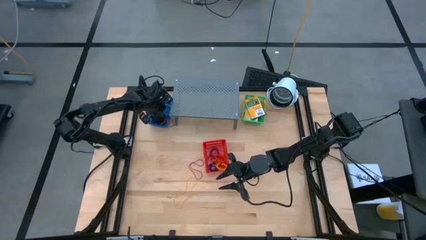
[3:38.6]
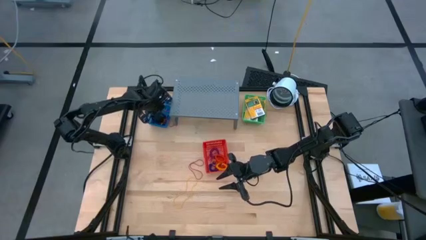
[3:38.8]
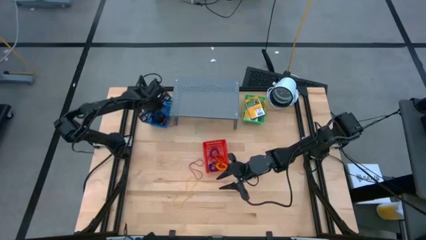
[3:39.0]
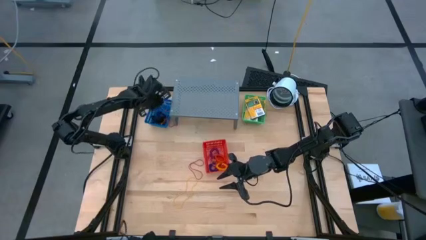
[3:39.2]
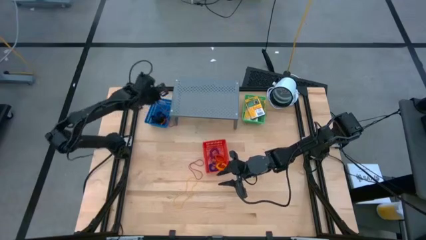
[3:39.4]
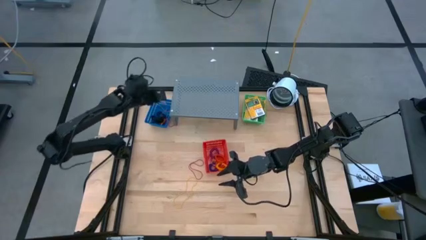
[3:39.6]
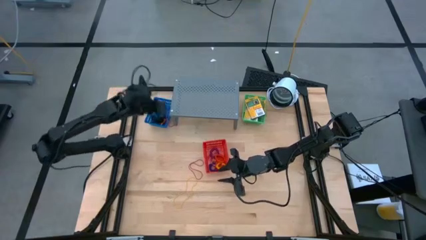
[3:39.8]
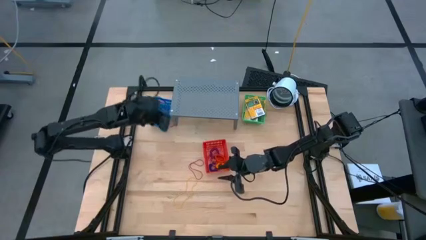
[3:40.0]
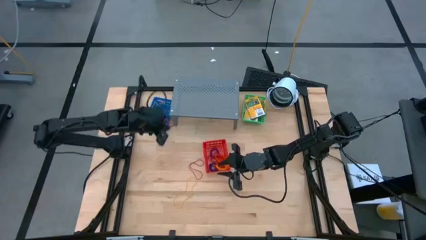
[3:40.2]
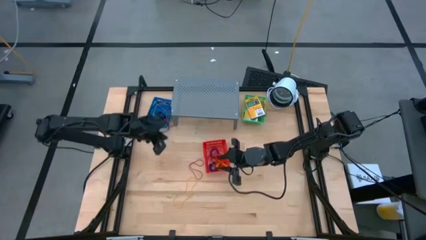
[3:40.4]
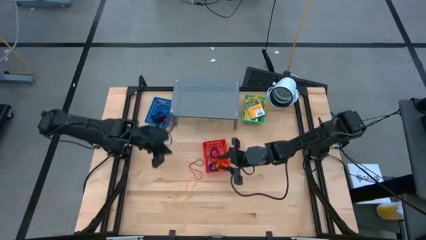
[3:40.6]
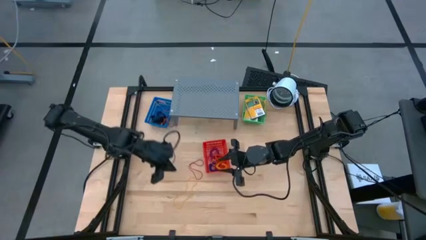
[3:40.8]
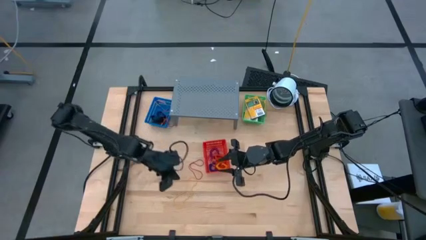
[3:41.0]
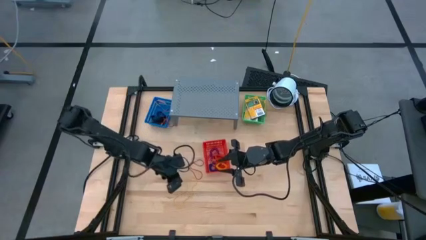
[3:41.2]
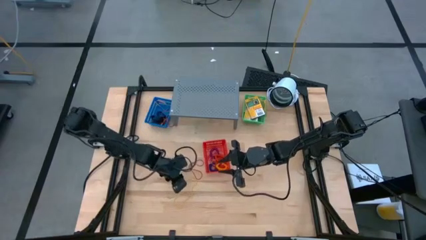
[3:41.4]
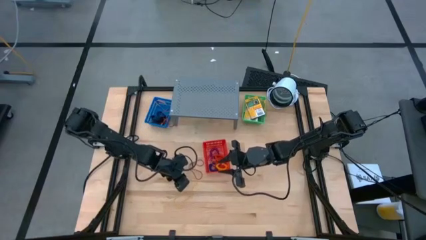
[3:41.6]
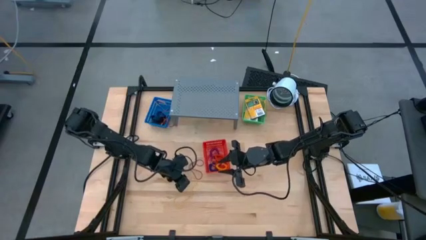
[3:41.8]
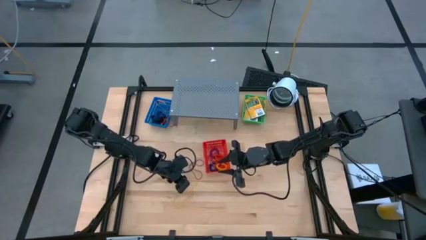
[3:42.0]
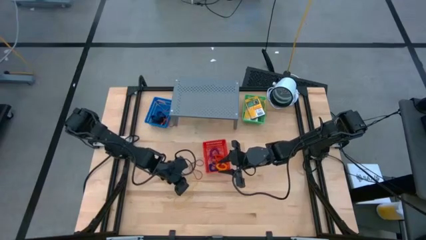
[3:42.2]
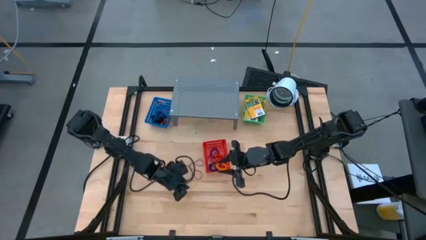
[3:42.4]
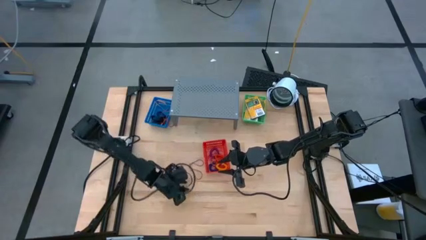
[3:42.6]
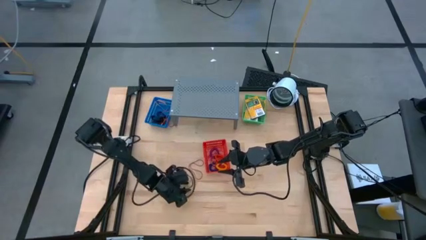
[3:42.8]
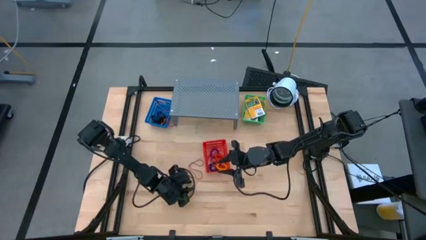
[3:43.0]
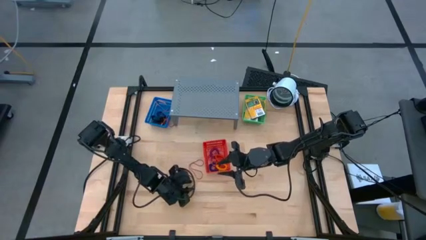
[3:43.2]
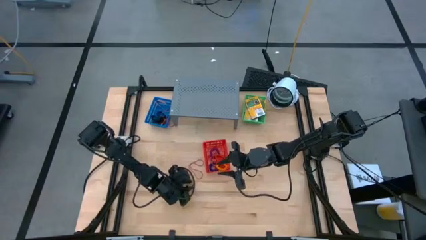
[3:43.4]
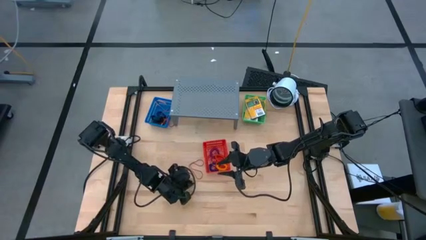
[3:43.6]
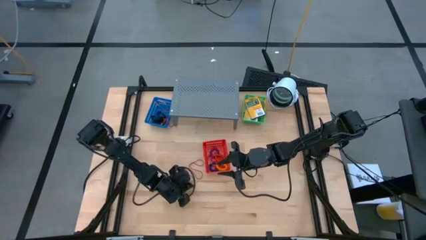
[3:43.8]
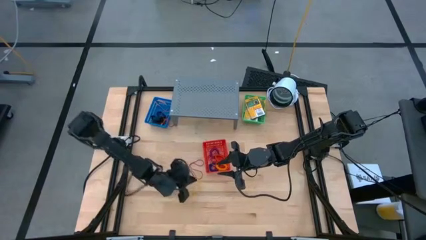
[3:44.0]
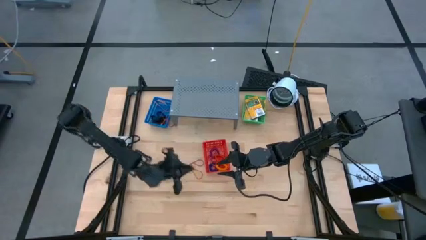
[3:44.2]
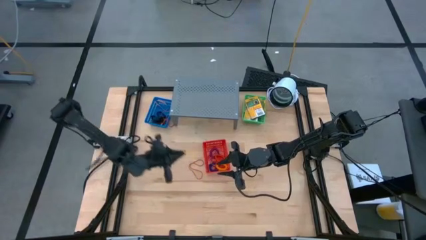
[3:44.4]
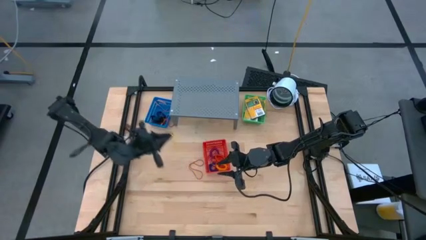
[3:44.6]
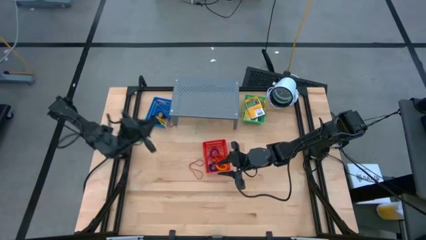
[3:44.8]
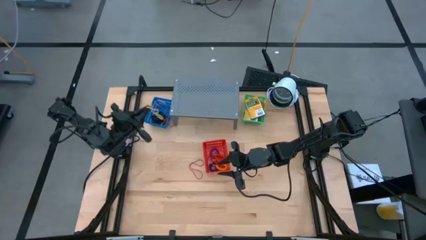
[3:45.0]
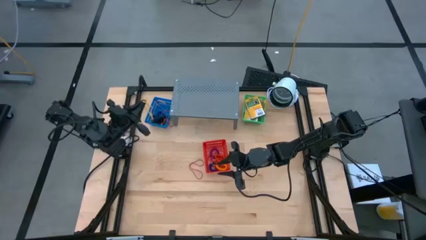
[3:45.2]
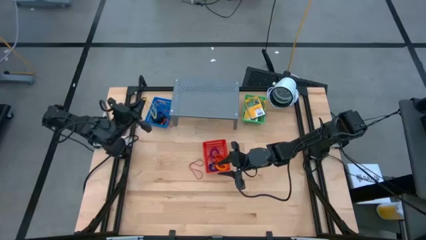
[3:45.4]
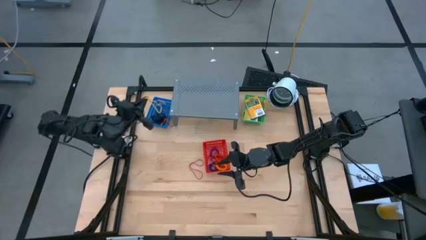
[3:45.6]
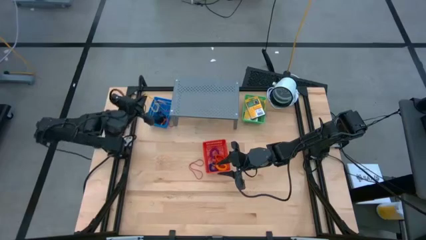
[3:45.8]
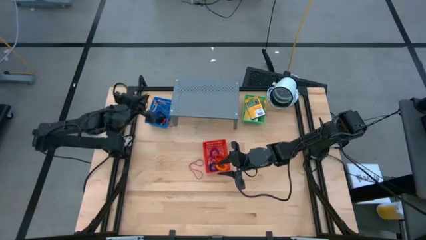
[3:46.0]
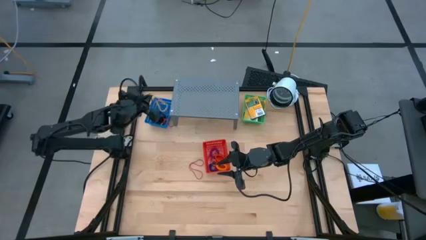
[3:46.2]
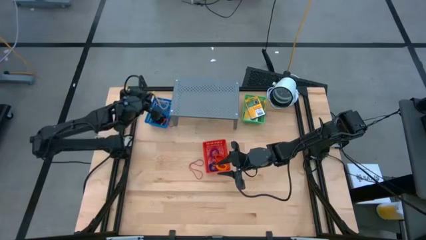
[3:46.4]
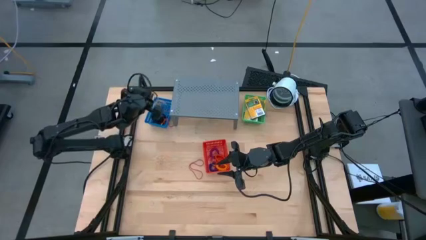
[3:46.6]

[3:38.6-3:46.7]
Task: Pick & Place Office Desk Supplies
Put the yellow rubber band into the blue basket

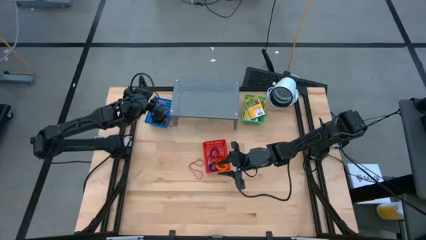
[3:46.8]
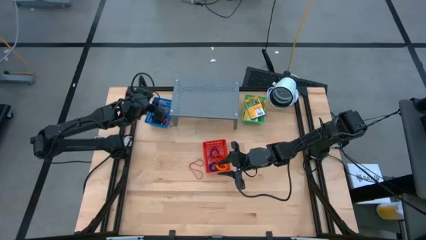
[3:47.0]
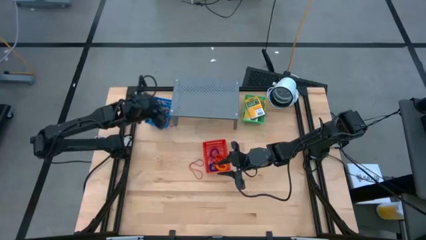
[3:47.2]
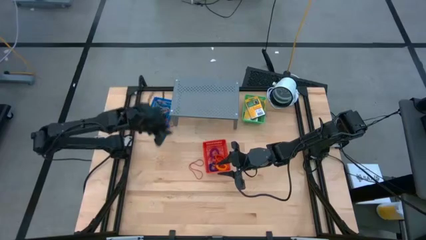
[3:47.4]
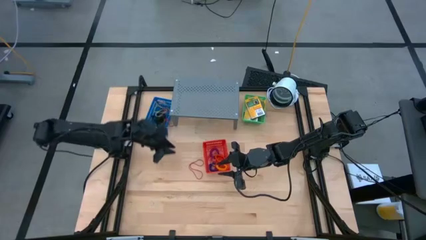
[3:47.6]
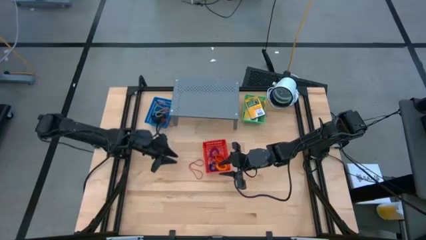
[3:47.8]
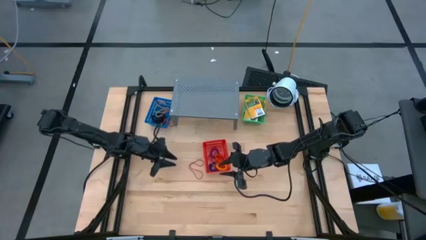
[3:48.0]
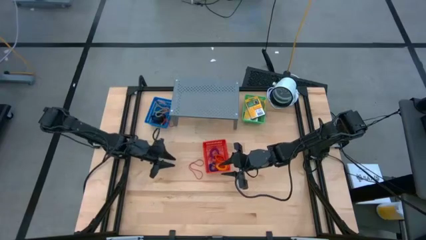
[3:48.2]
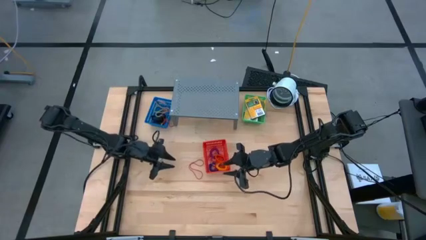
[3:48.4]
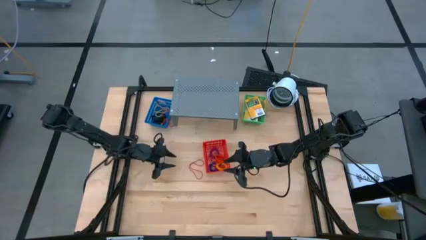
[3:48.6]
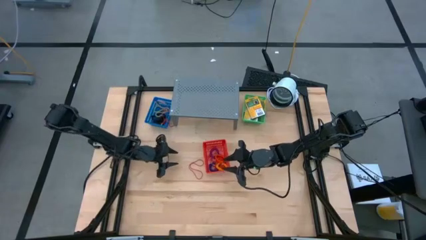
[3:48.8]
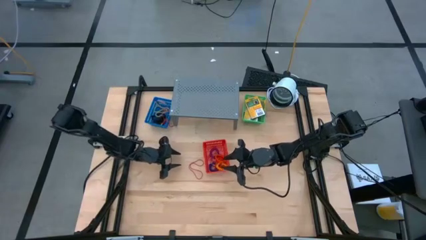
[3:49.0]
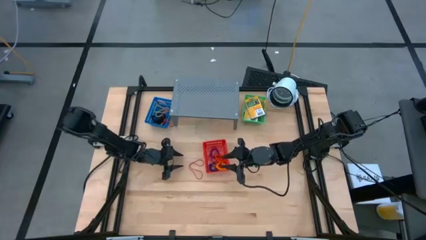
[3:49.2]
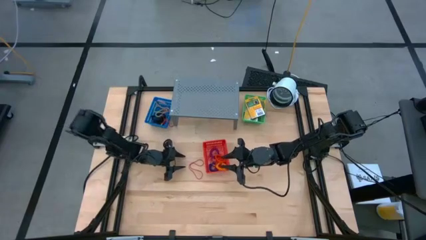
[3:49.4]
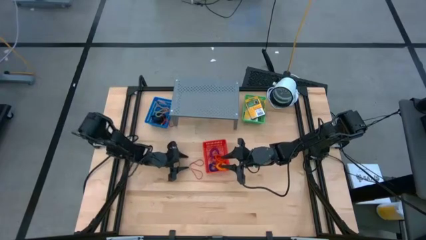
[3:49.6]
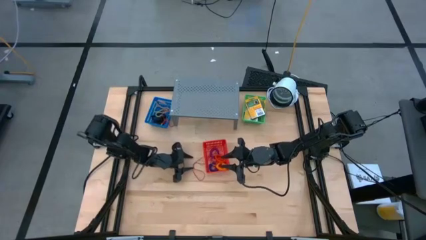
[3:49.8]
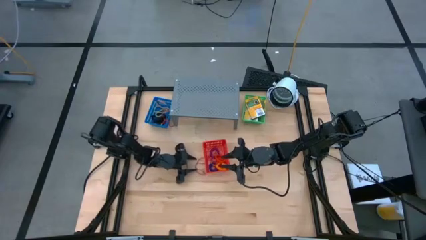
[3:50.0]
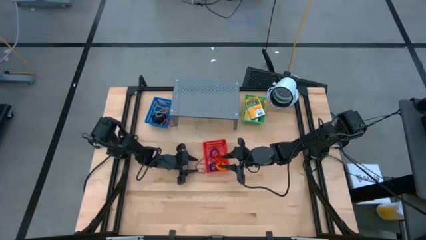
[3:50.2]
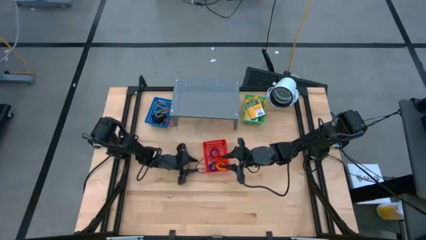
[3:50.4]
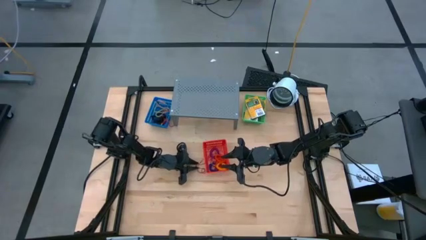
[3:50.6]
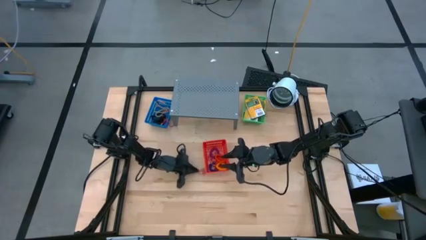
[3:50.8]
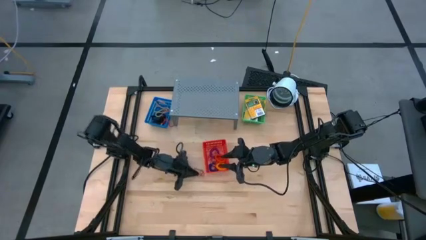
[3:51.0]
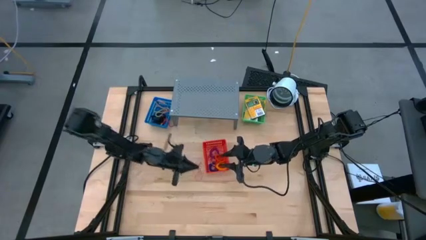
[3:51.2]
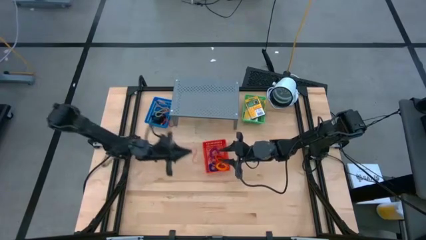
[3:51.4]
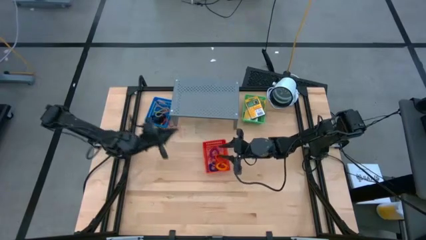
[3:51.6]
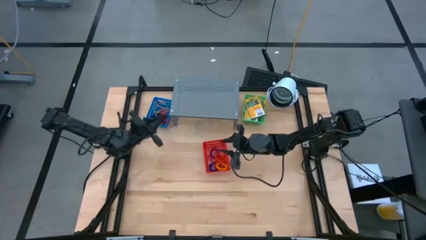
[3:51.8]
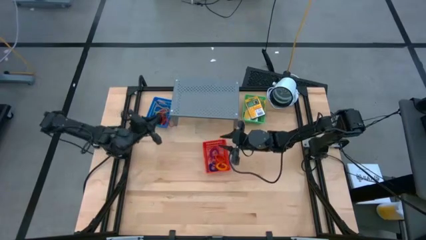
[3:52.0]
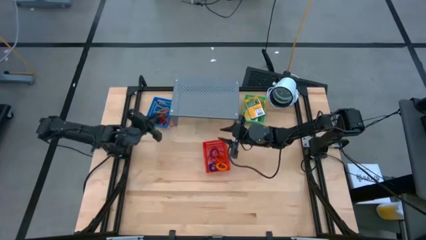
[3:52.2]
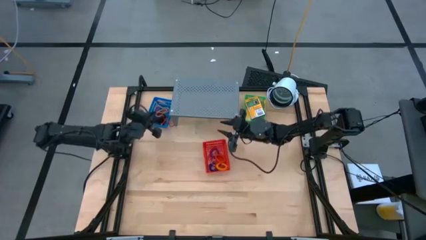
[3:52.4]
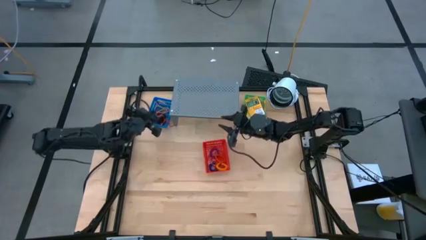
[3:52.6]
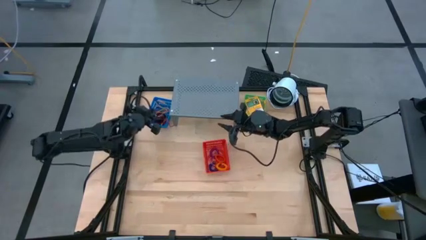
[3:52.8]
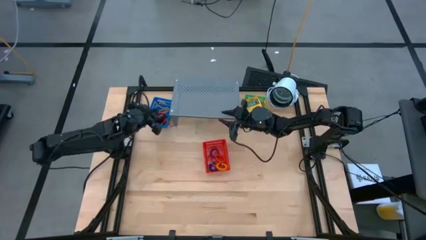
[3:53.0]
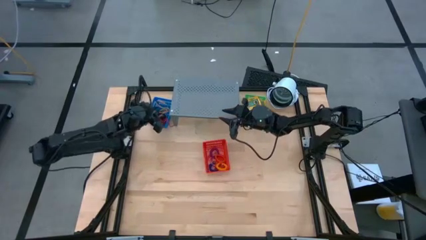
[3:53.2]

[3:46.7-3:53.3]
Put the red rubber band into the blue basket

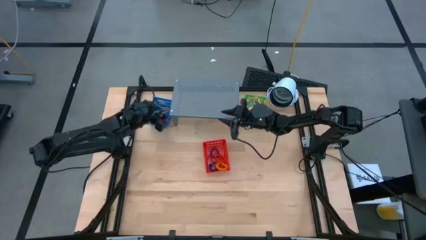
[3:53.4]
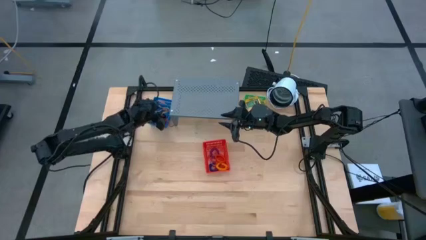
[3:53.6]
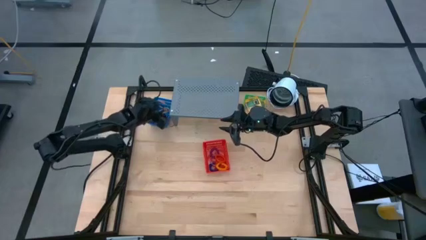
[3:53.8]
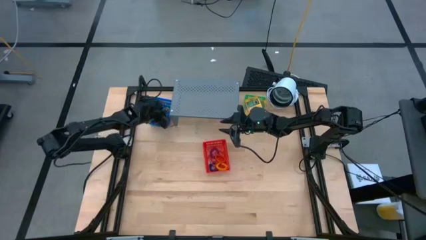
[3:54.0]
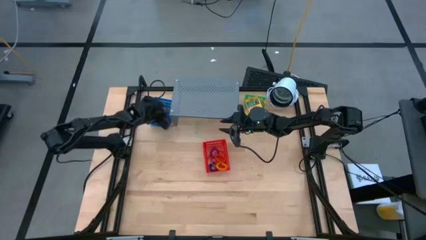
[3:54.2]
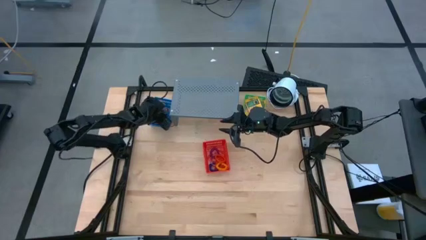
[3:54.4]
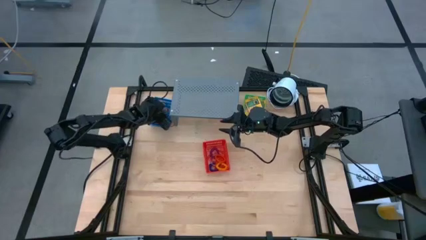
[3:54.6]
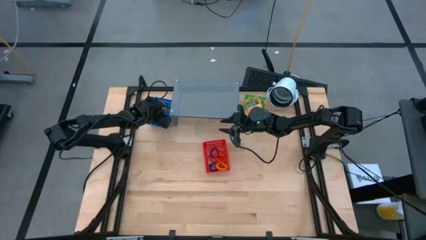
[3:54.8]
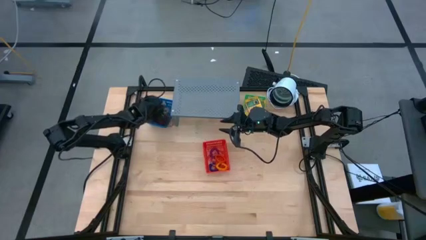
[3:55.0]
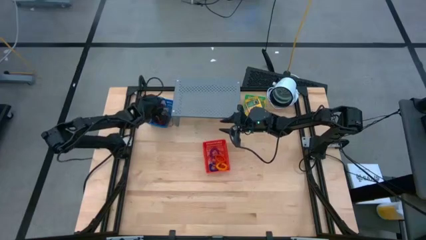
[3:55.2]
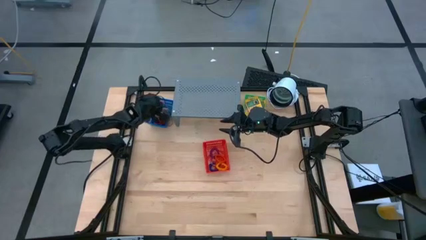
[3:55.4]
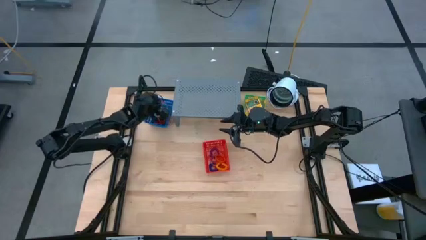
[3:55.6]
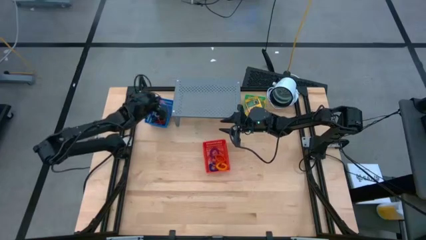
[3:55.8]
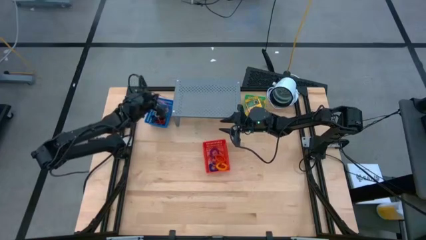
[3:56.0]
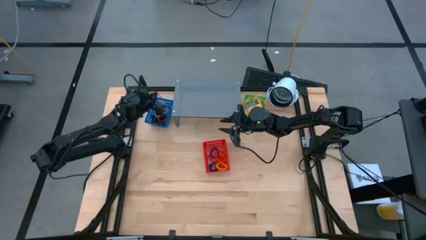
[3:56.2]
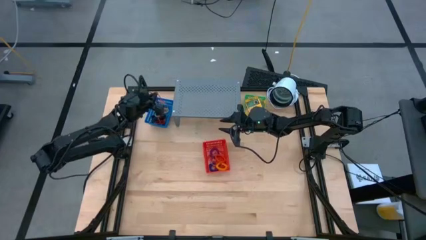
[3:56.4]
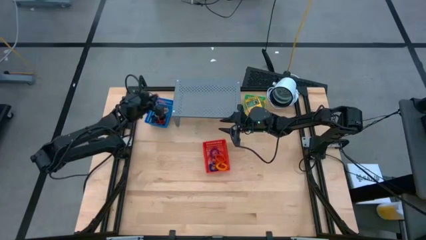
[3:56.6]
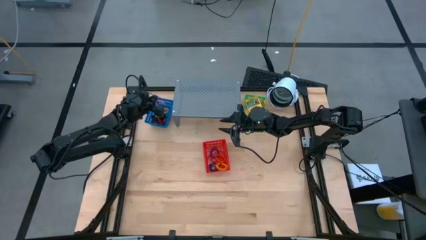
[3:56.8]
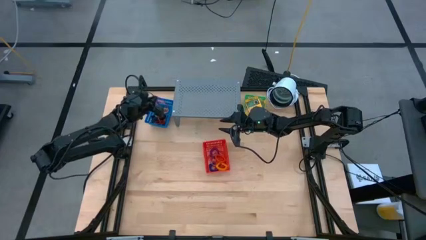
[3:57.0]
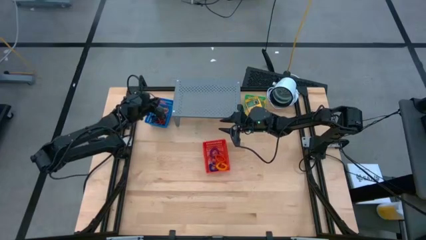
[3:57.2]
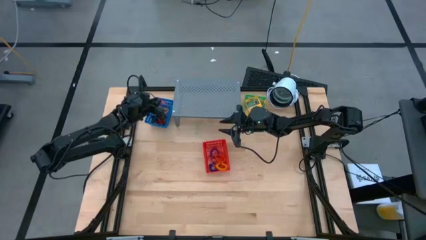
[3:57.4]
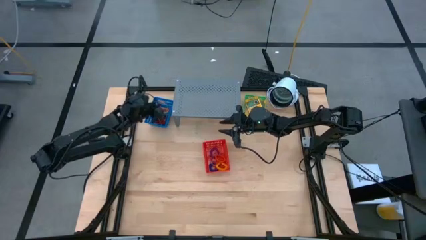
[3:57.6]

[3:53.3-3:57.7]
Put the bottom red rubber band into the blue basket
